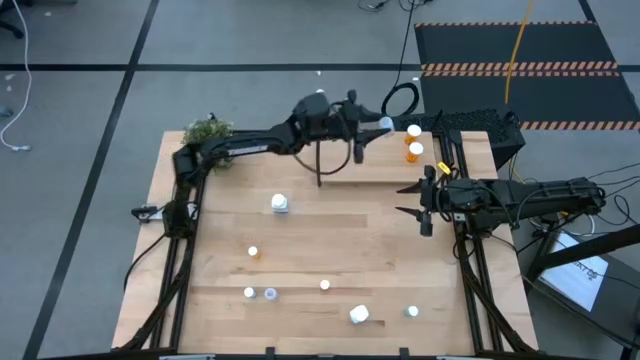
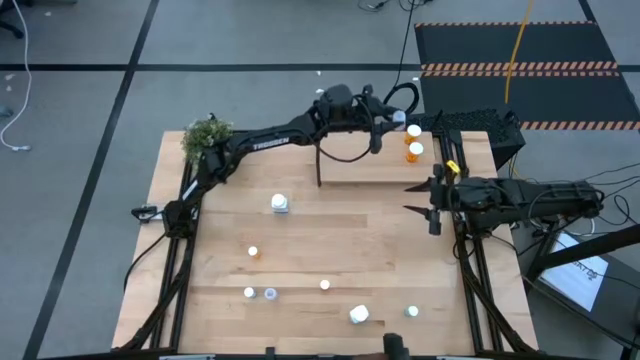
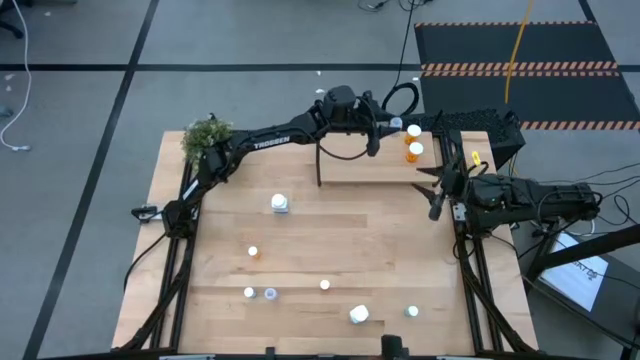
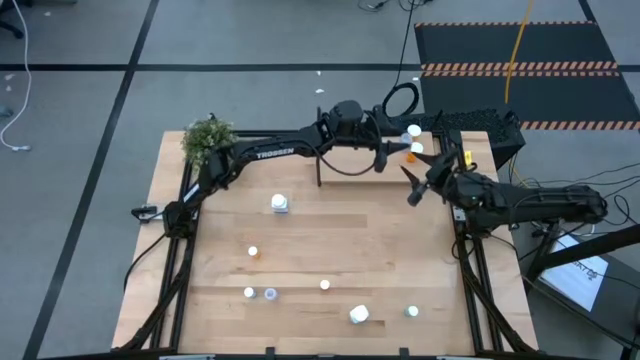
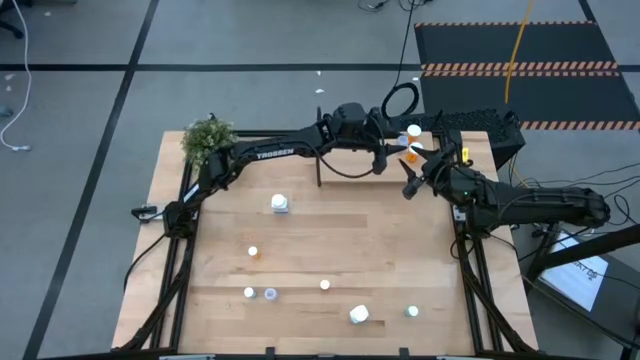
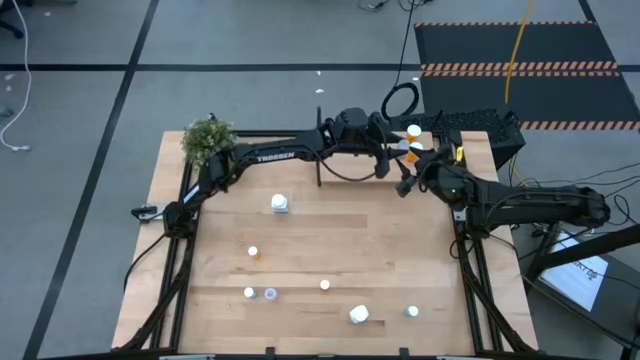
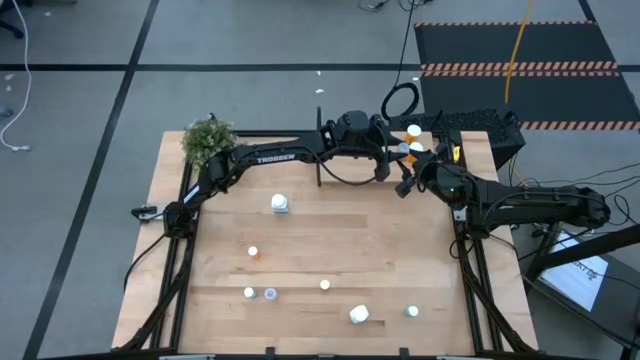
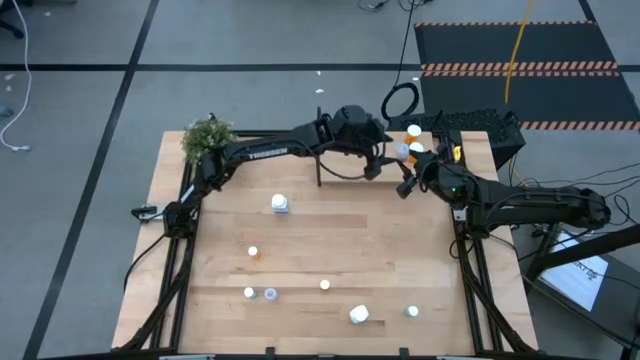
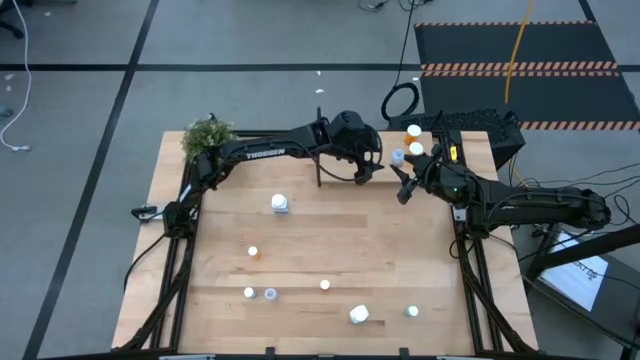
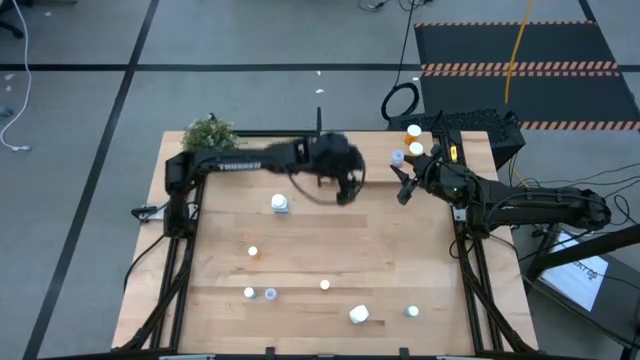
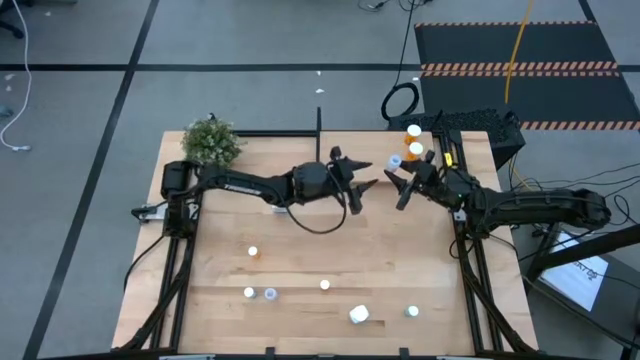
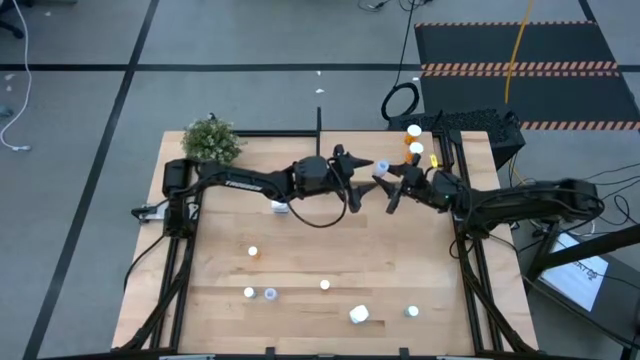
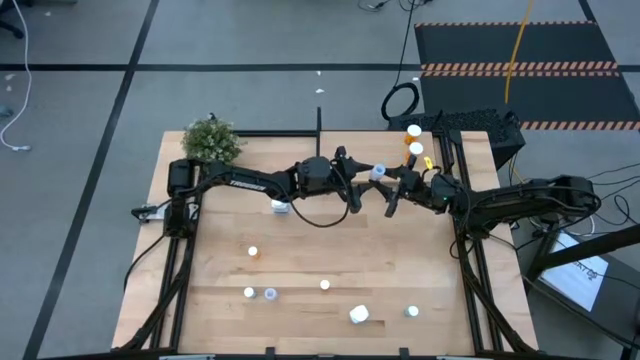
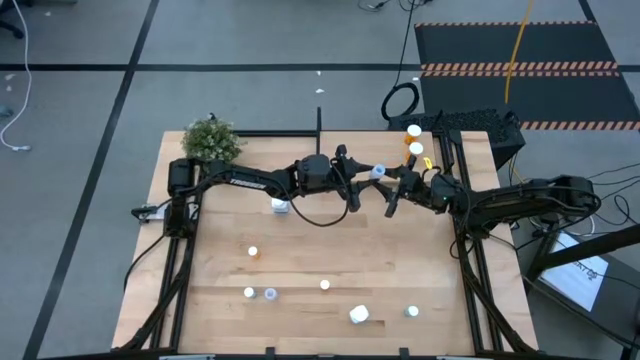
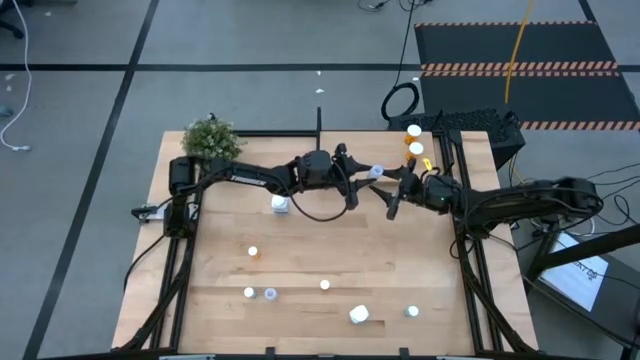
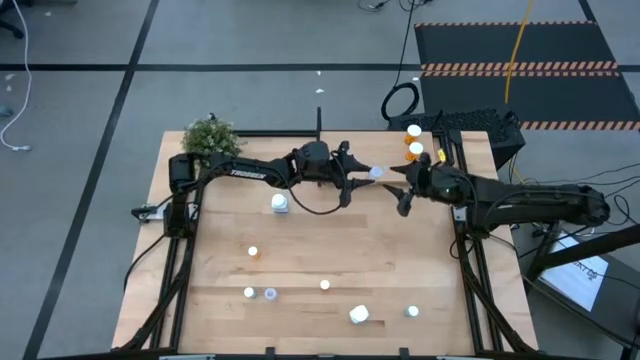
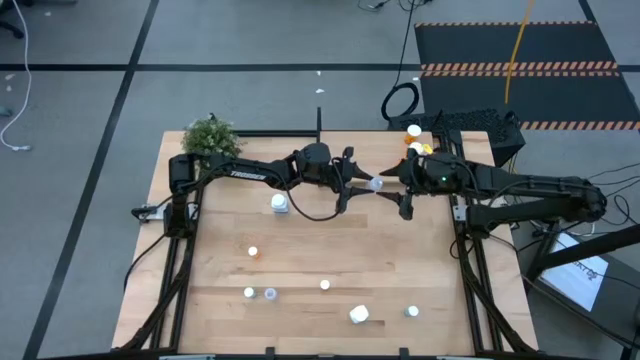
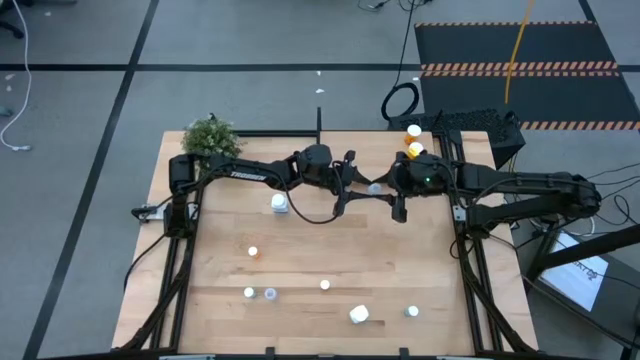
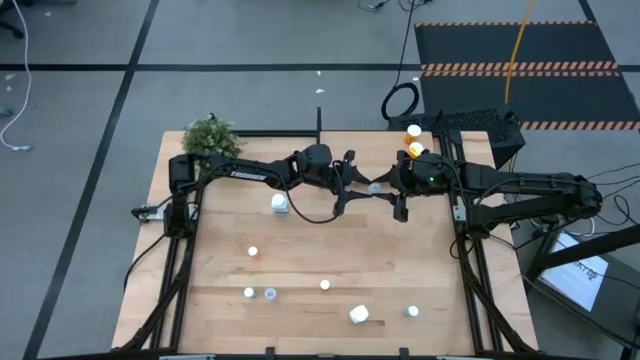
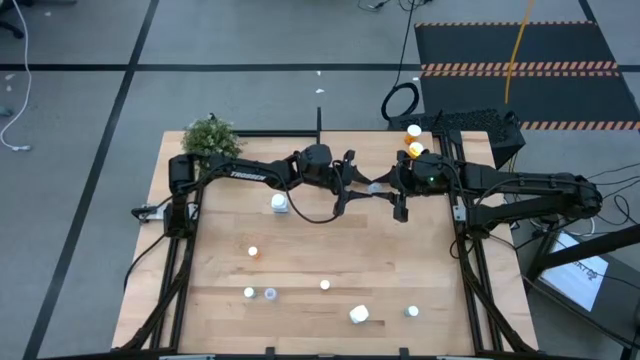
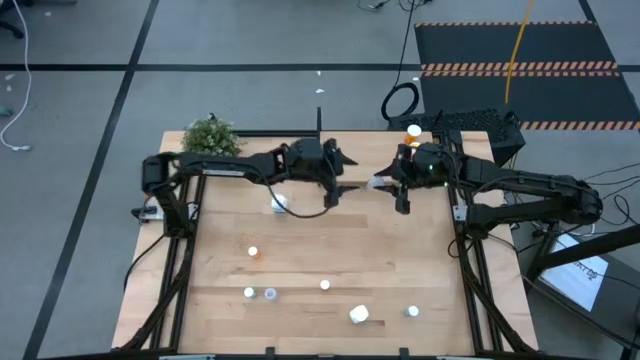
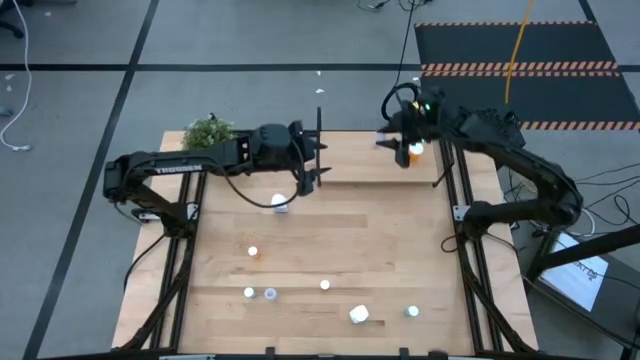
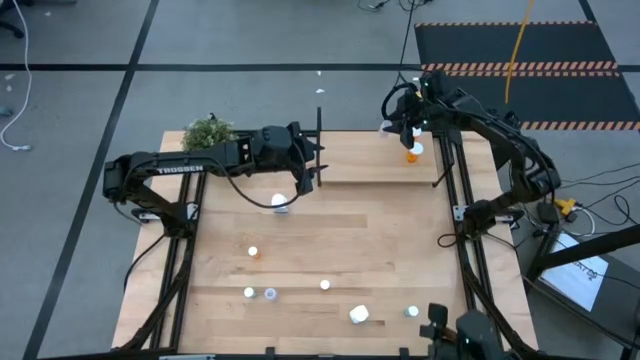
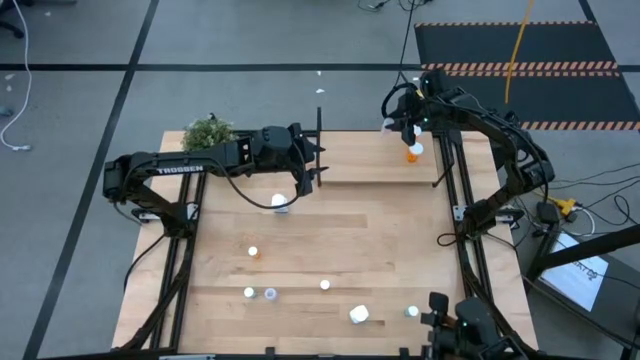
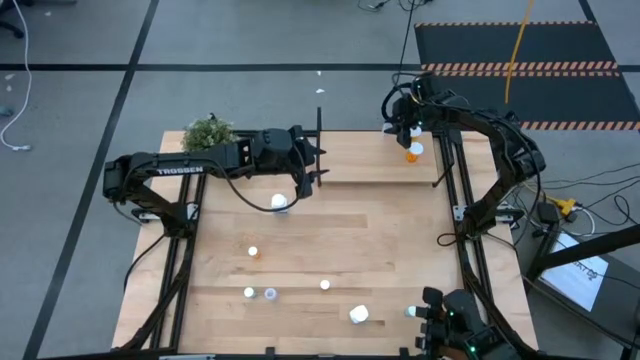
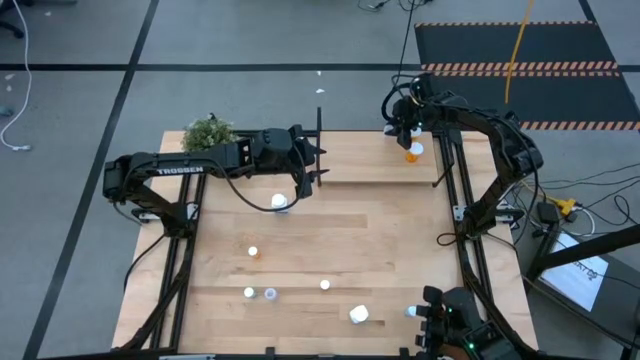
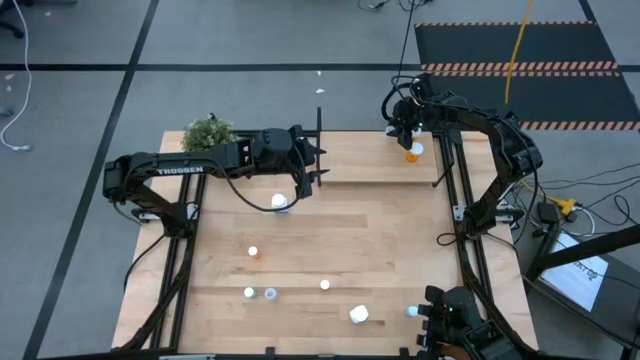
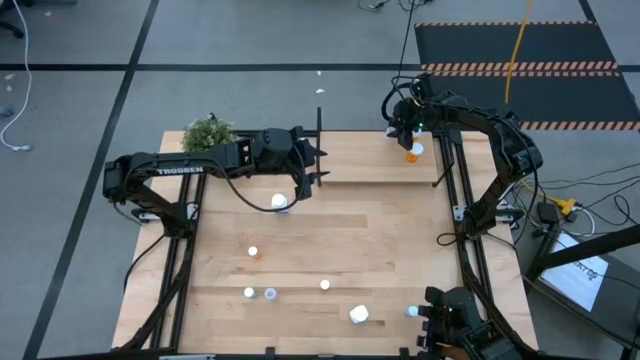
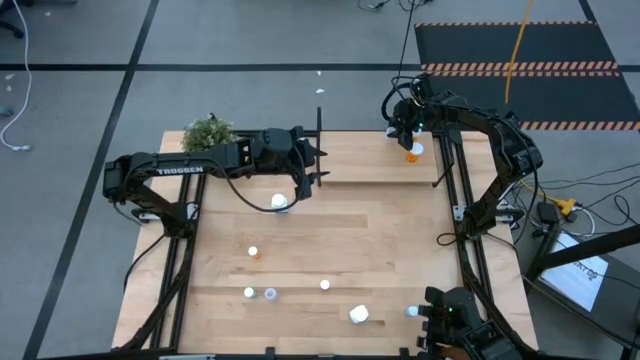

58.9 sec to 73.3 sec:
Task: Pick and place medicine bottles onto shelf by color
Put the right transparent pill bottle on the shelf

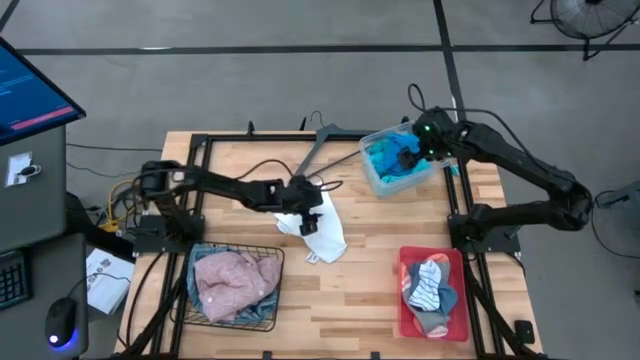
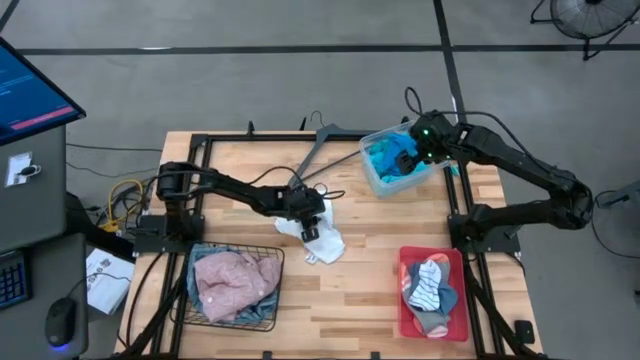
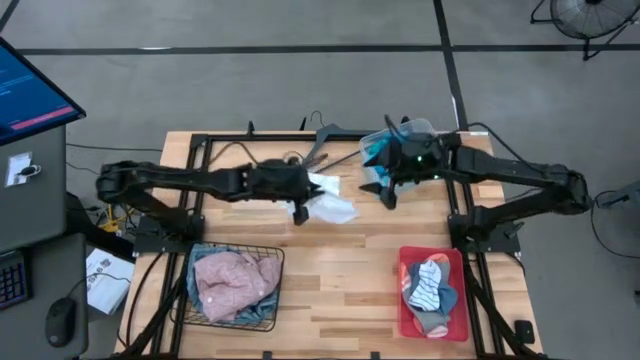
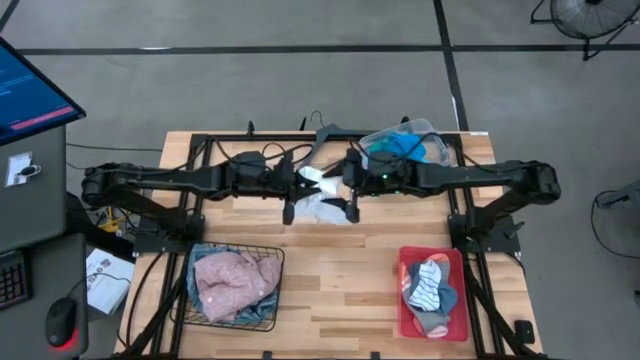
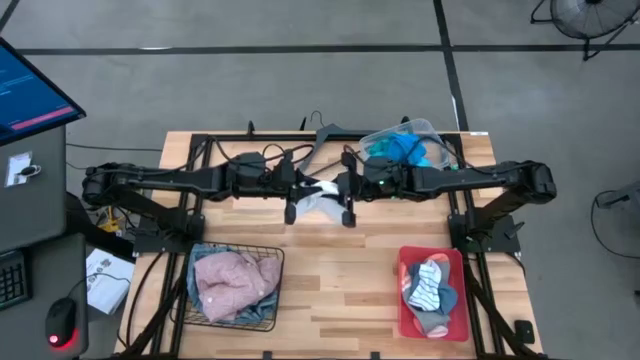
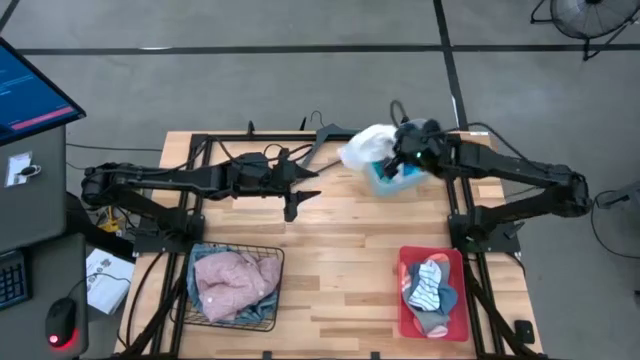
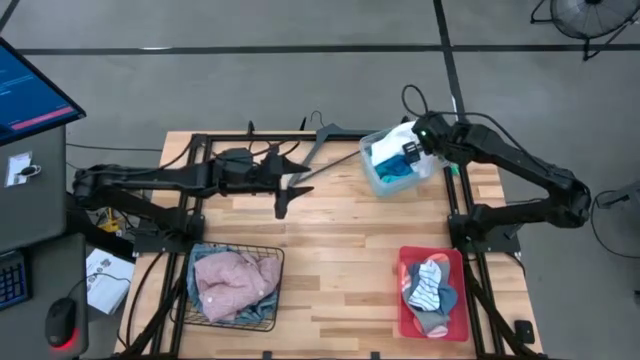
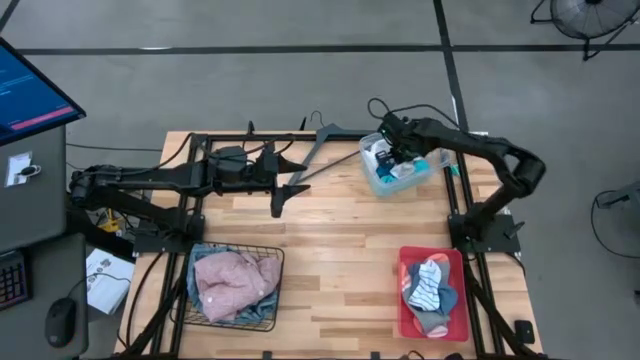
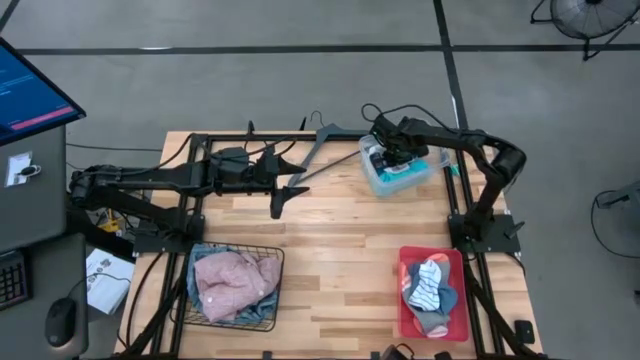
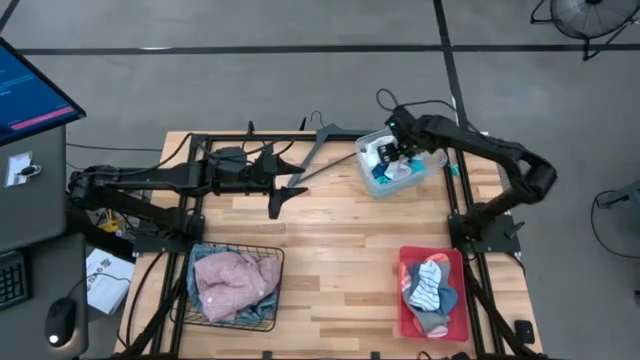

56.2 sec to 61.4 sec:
Task: Pick & Place Cloths
Put the white towel into the white bin
